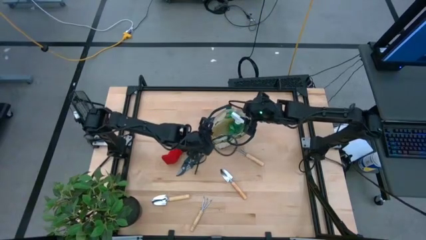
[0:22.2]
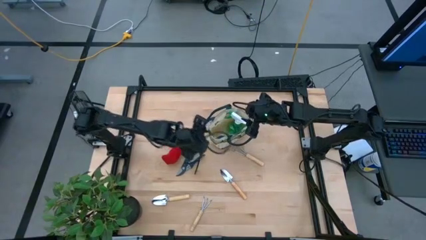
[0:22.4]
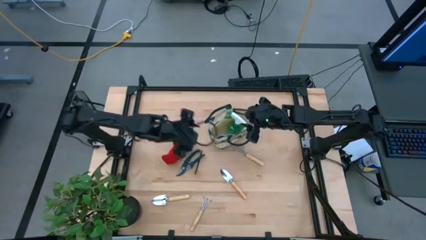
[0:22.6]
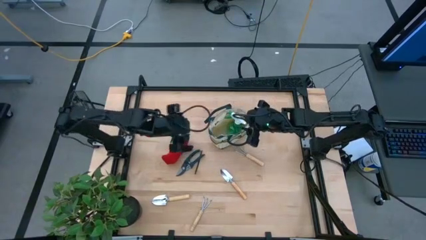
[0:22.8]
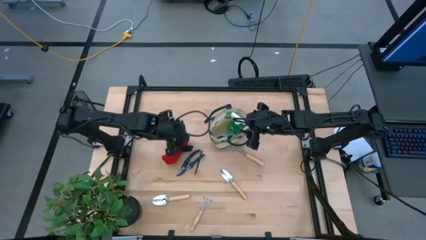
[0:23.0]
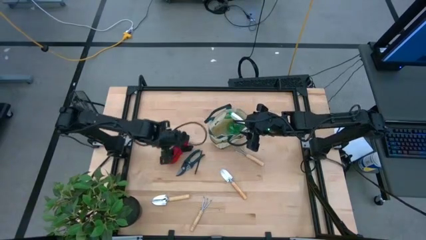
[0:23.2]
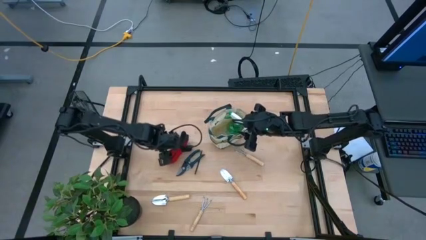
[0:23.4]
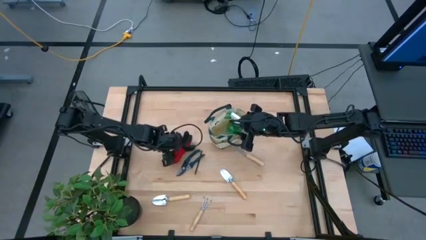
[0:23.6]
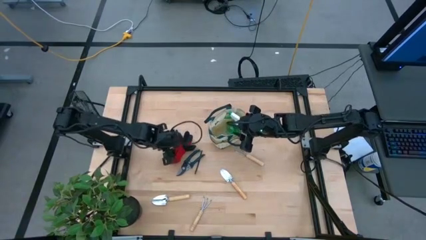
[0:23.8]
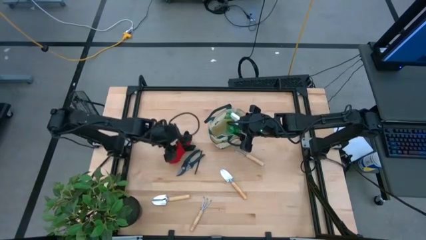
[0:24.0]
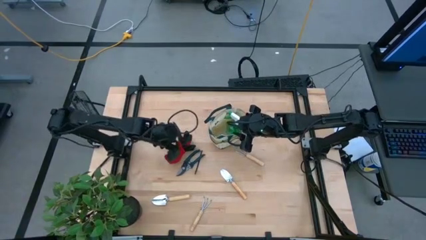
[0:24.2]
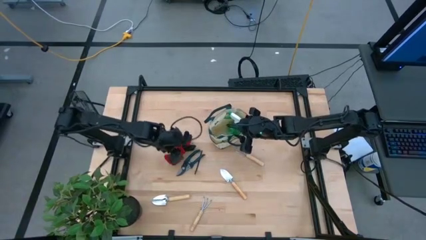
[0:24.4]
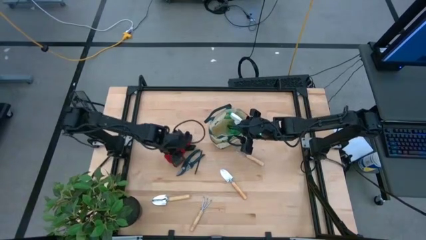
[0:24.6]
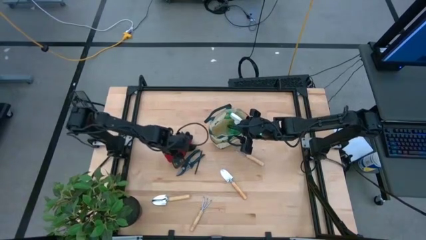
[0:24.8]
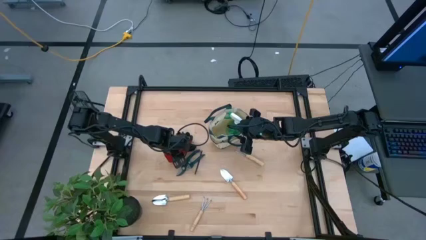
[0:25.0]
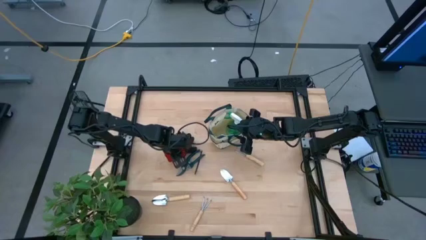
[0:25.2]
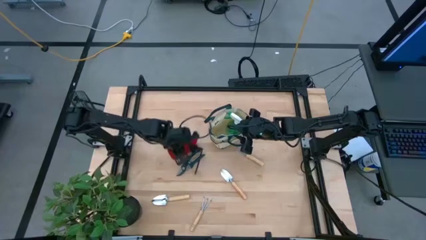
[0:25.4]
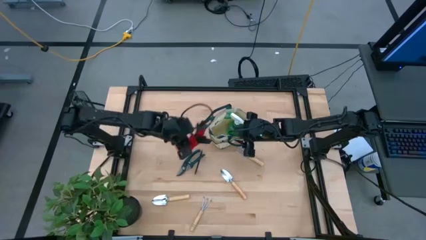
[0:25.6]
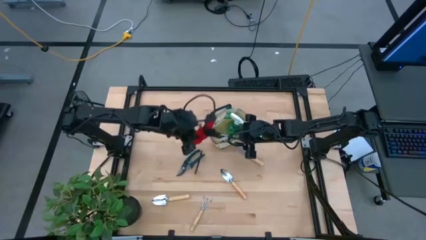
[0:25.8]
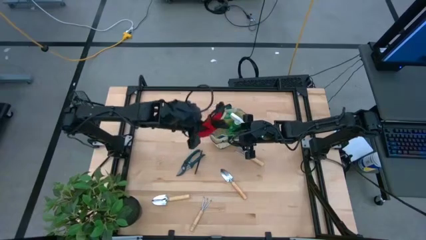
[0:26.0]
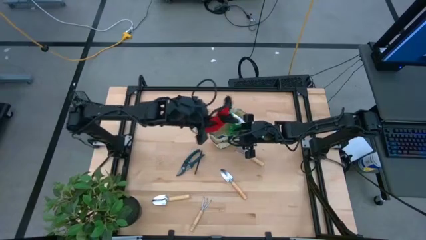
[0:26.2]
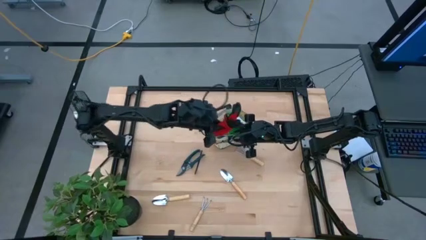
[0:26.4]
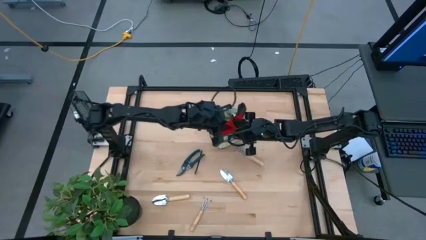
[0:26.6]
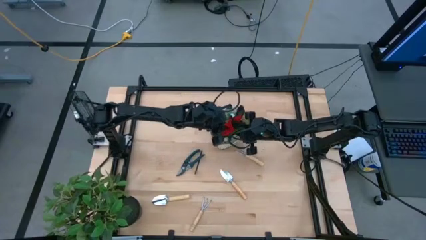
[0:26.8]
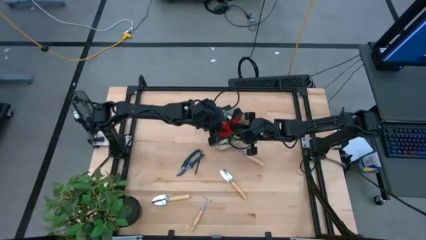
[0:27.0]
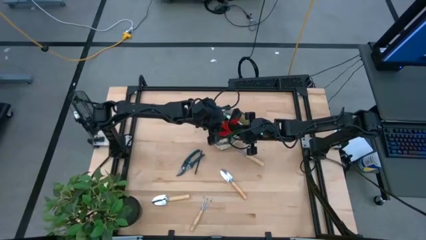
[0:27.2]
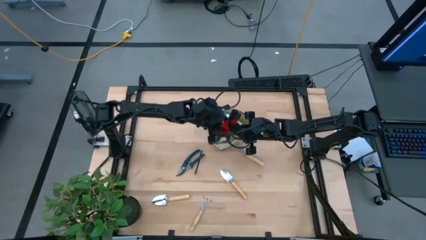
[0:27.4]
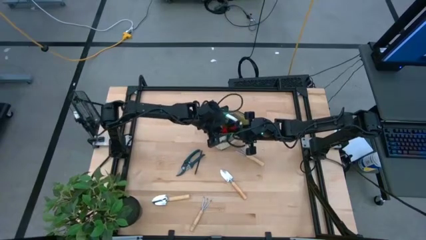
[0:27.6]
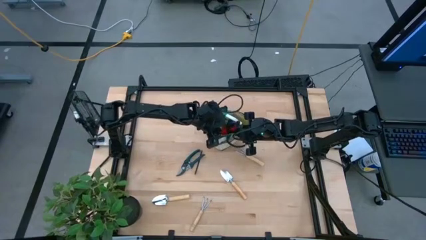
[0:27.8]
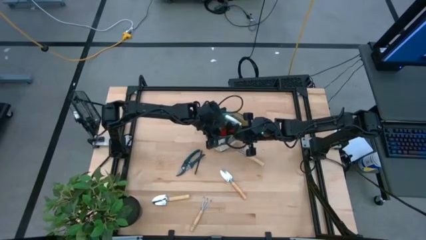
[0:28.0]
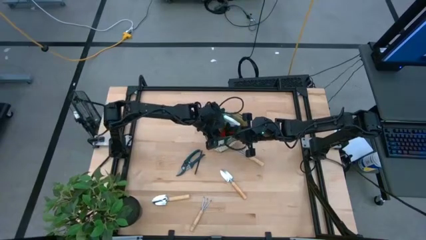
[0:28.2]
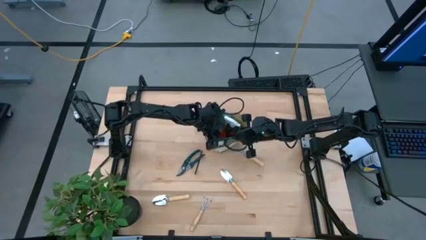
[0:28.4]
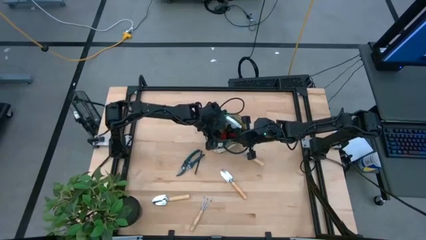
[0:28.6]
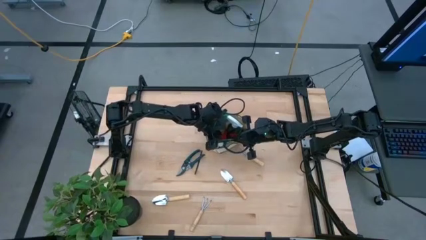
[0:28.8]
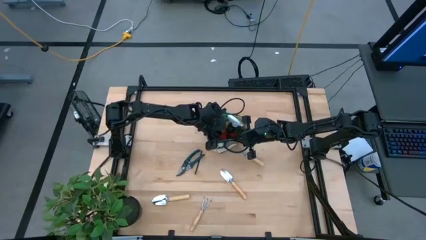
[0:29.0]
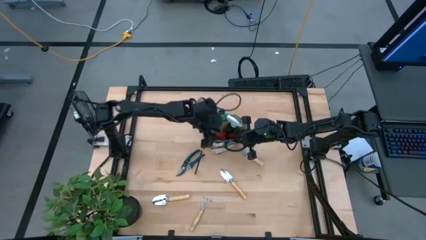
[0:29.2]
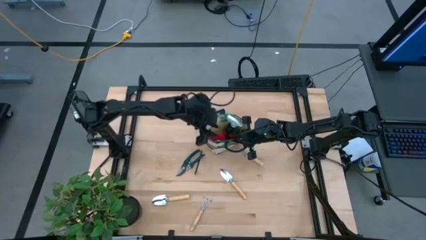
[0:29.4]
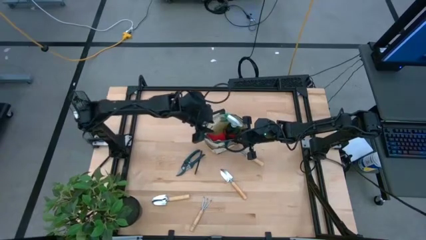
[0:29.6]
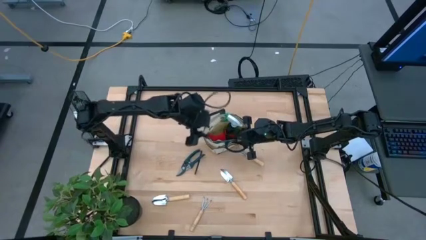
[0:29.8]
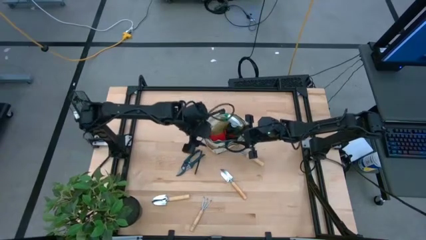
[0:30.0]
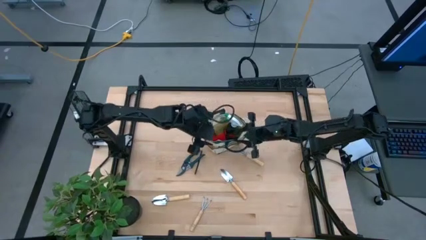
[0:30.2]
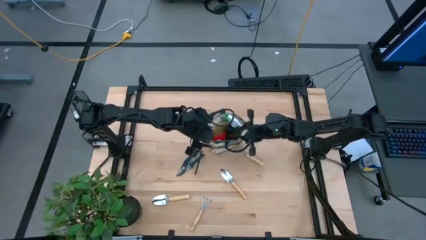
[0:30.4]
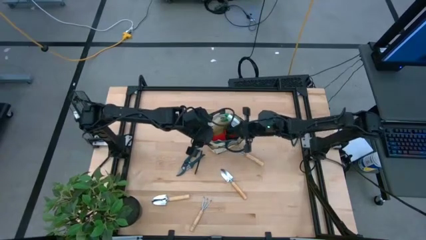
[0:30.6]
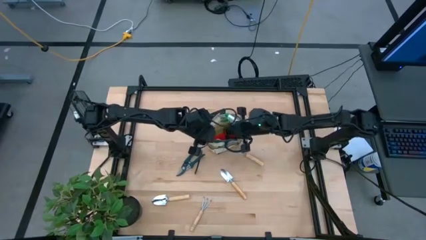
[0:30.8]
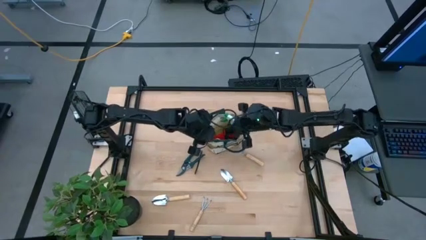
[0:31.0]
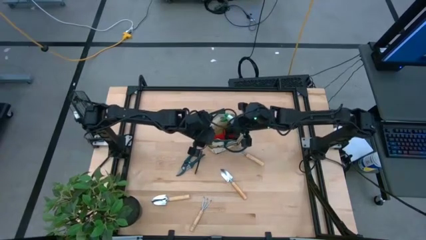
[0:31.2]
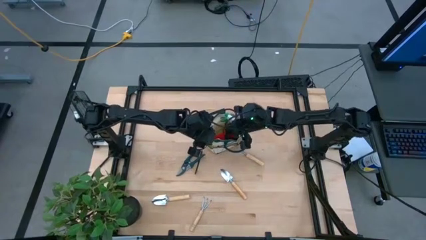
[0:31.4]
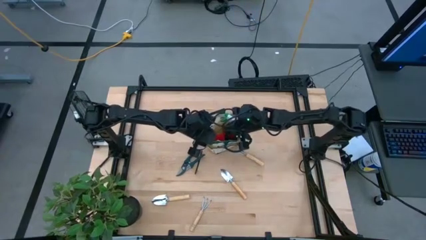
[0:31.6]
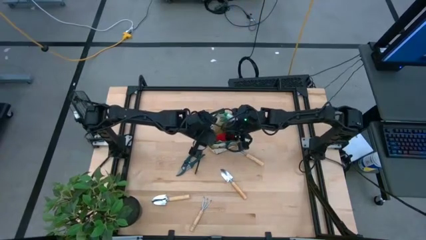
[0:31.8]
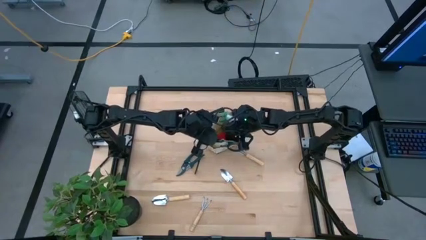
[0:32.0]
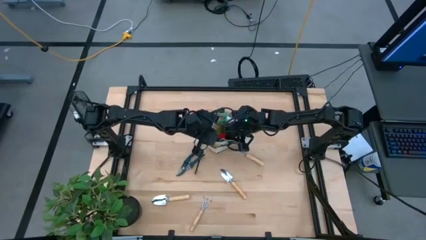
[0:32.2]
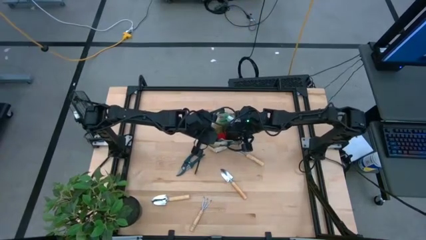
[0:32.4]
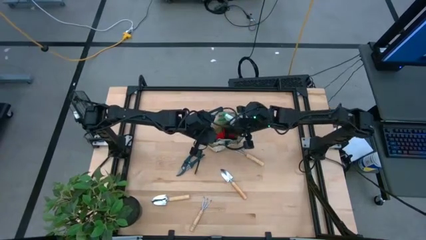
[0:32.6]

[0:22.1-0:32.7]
Task: Pick & Place Garden tools in Gardening bag
Put the red gloves into the gardening bag
